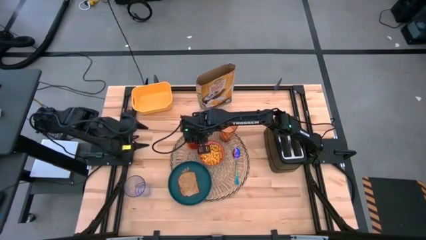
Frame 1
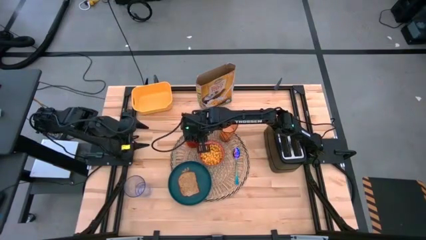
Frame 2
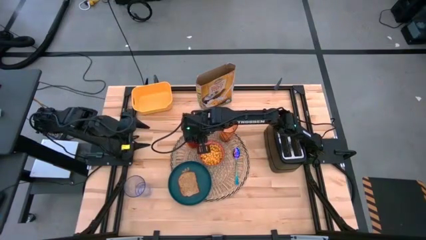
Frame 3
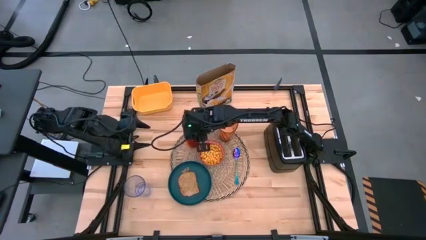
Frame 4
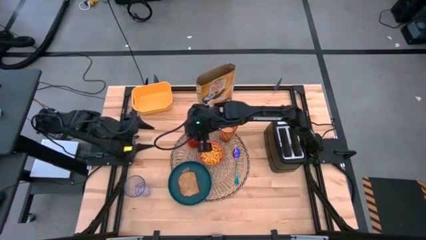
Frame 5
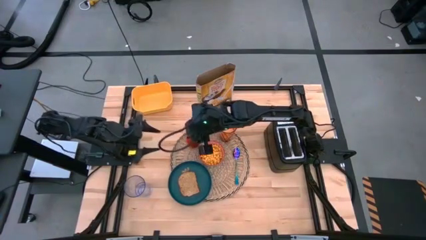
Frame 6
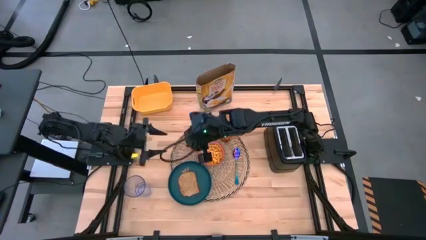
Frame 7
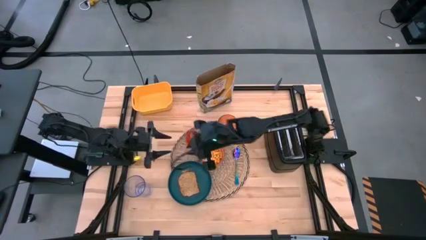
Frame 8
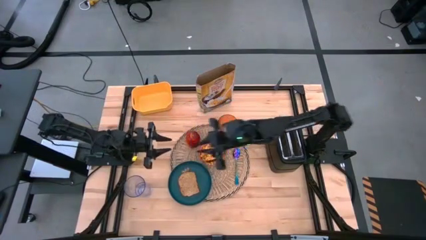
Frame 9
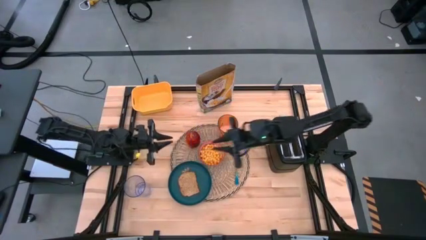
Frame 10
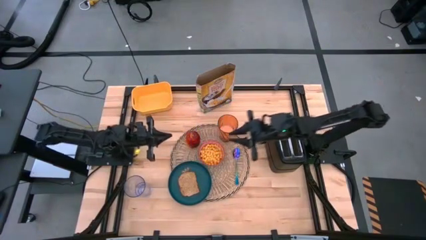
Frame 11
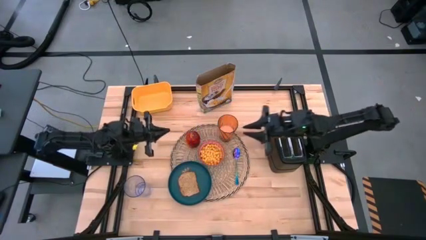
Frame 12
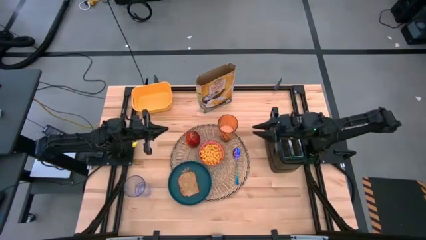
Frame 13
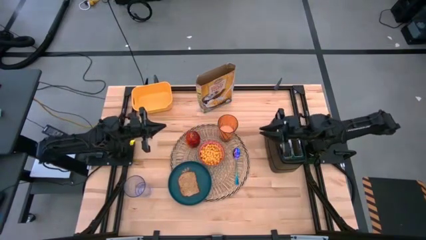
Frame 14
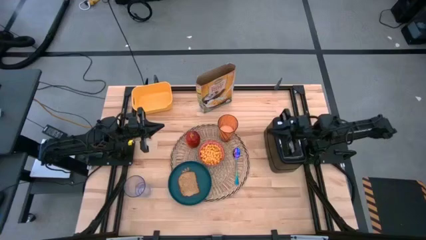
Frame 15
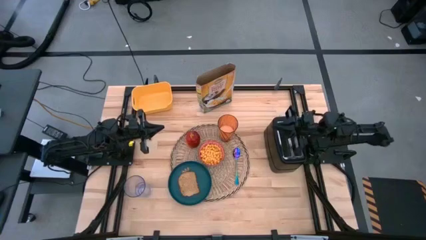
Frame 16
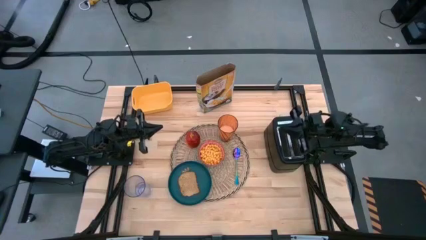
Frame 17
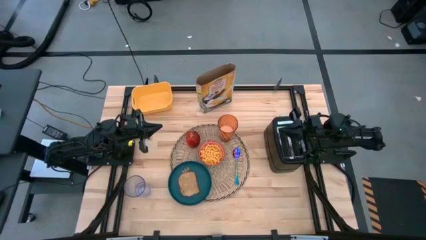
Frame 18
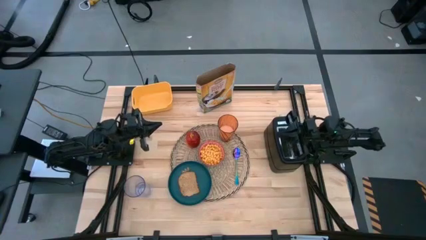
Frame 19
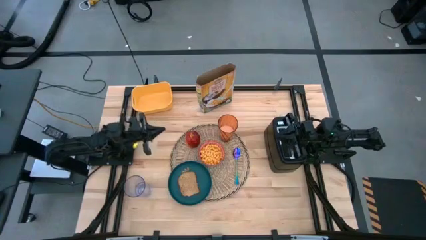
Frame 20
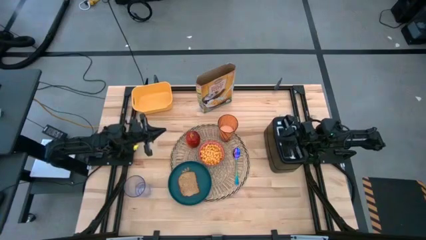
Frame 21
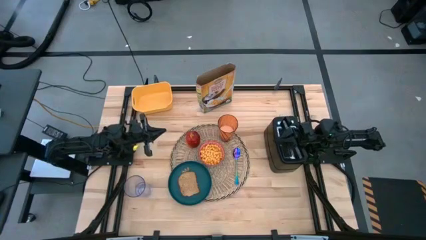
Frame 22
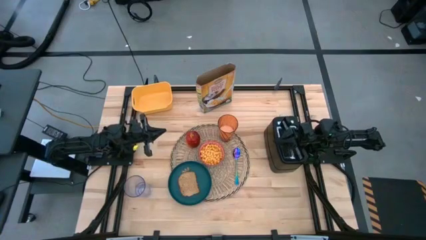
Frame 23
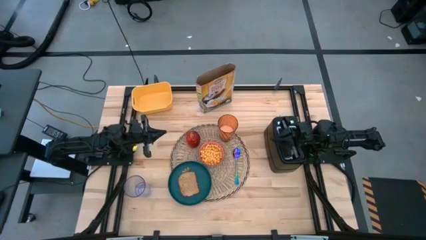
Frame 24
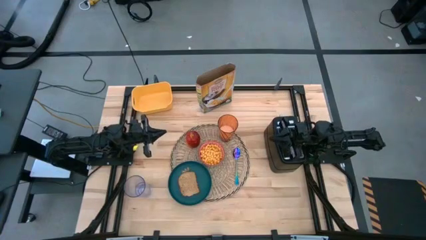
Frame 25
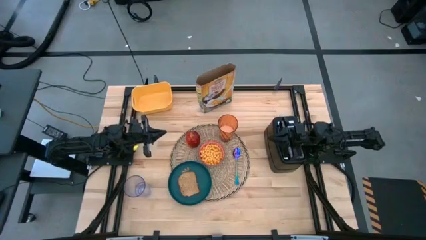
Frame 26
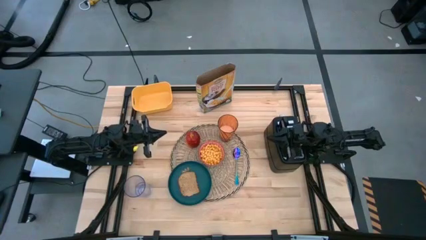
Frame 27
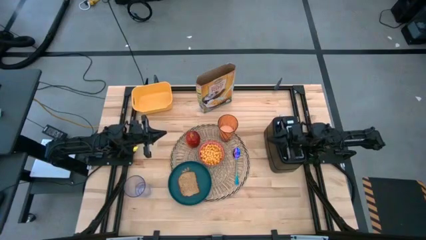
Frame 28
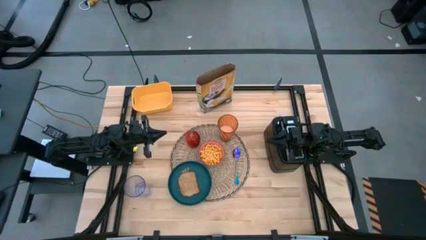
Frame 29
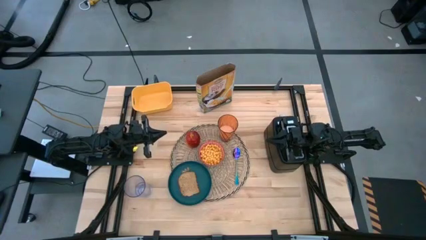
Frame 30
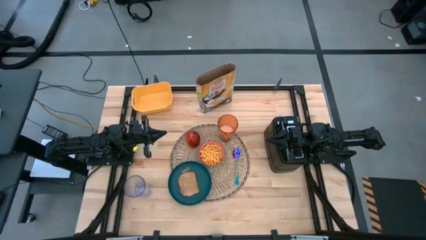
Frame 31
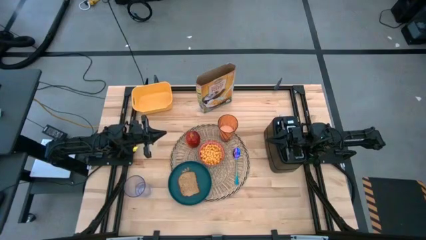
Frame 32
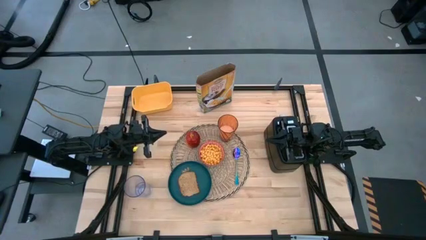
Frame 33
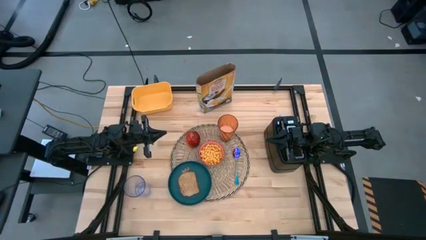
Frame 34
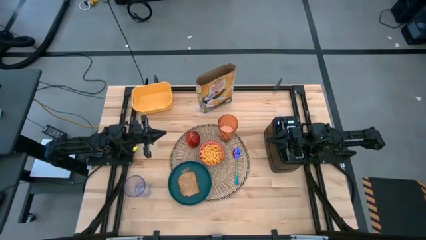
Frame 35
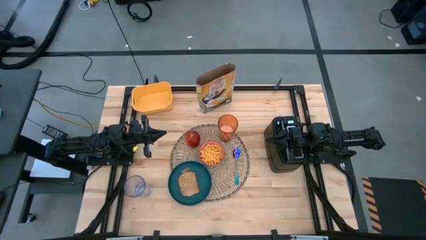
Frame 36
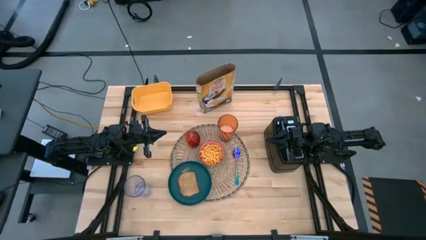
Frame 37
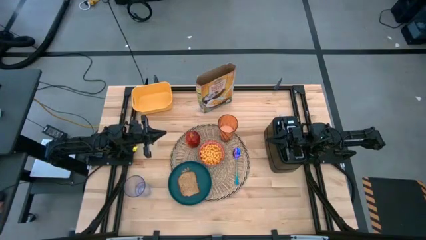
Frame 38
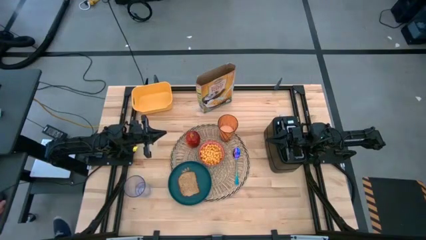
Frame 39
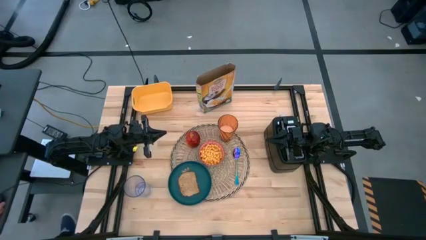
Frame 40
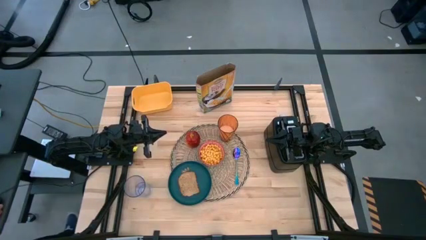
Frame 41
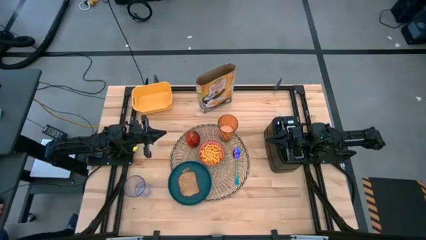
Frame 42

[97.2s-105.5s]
Task: Arrange a breakfast setting
Return to Home Position

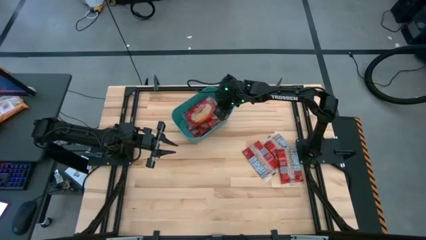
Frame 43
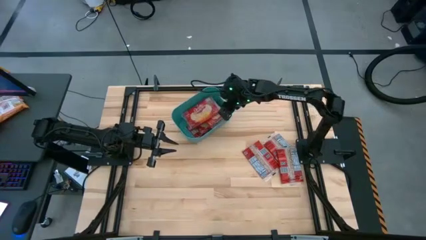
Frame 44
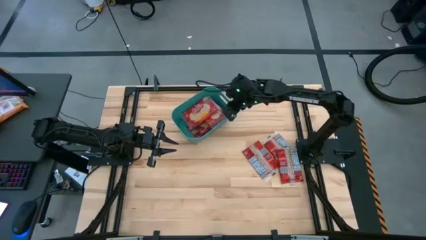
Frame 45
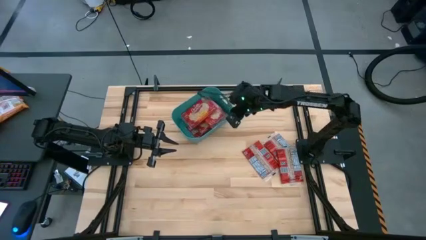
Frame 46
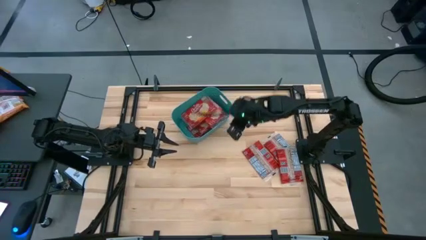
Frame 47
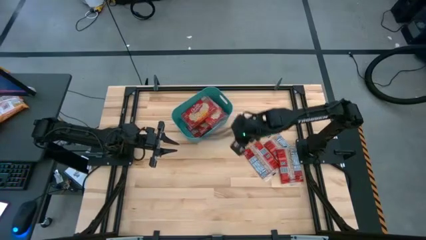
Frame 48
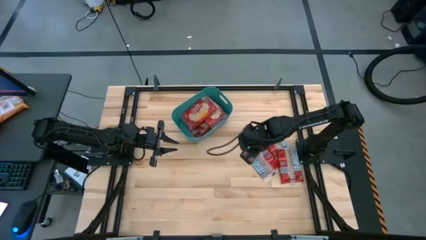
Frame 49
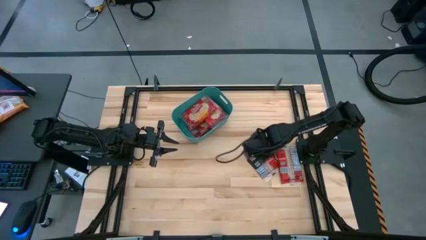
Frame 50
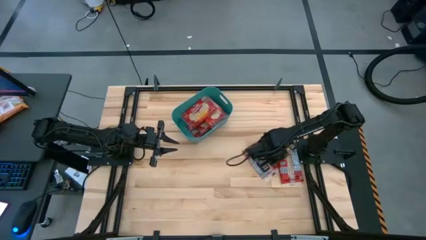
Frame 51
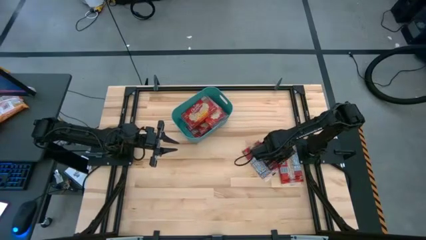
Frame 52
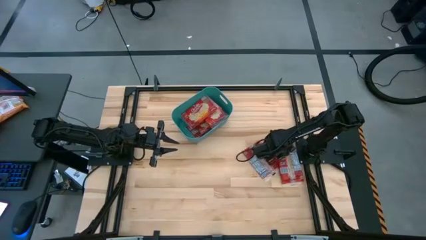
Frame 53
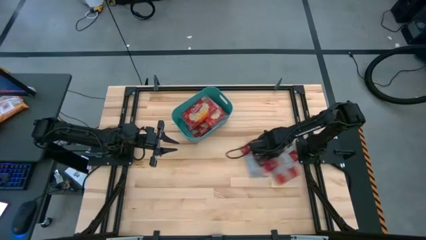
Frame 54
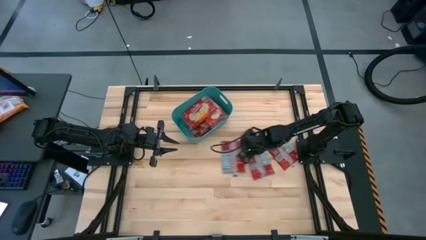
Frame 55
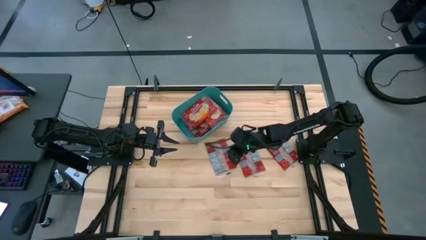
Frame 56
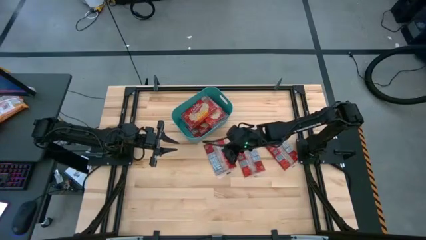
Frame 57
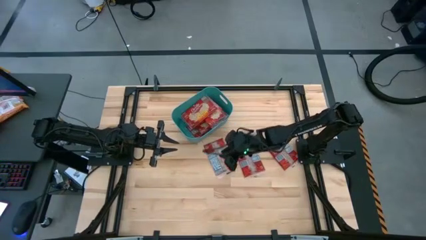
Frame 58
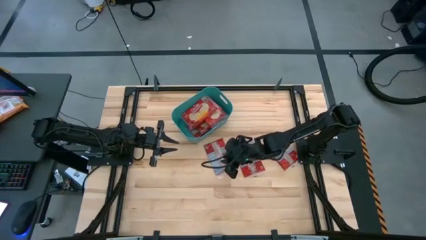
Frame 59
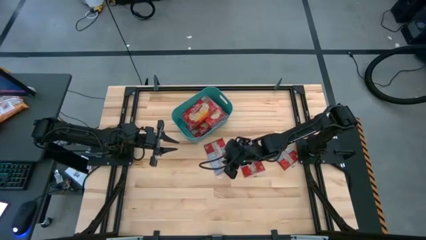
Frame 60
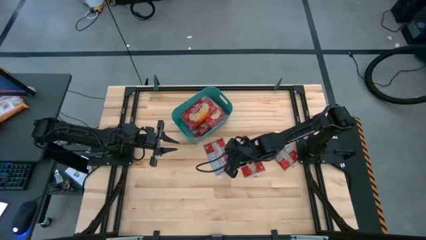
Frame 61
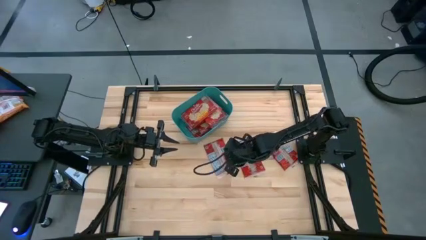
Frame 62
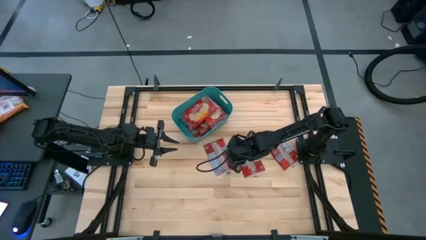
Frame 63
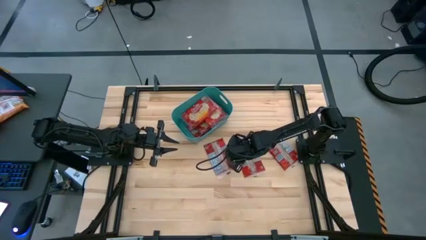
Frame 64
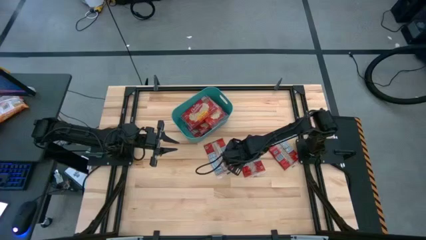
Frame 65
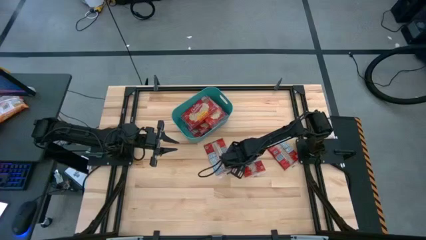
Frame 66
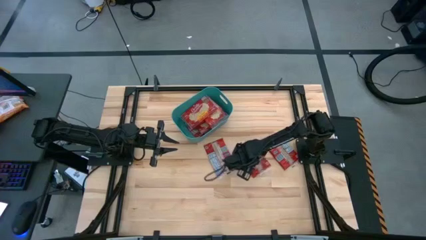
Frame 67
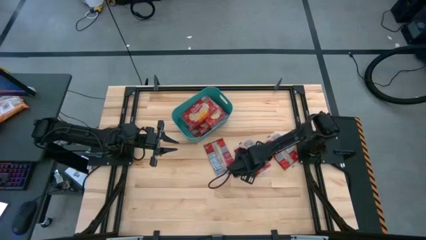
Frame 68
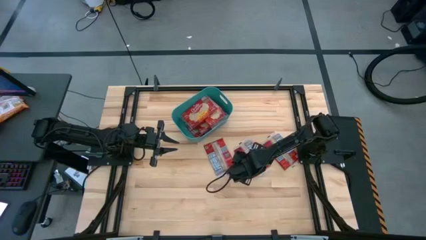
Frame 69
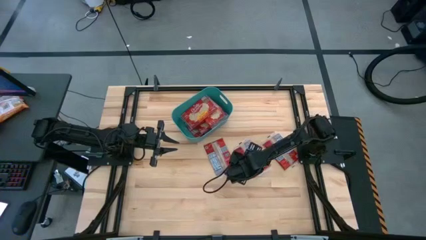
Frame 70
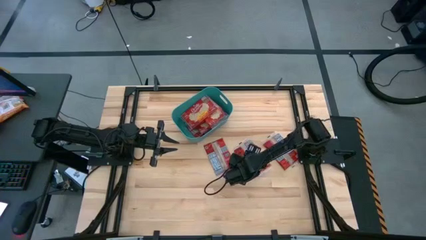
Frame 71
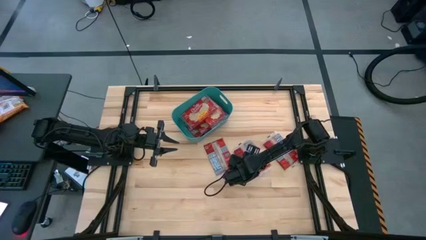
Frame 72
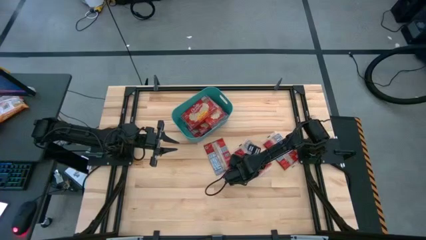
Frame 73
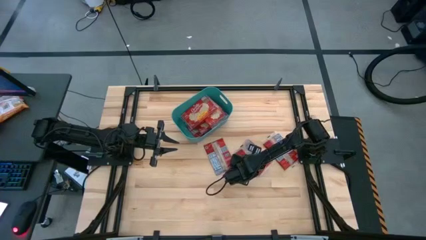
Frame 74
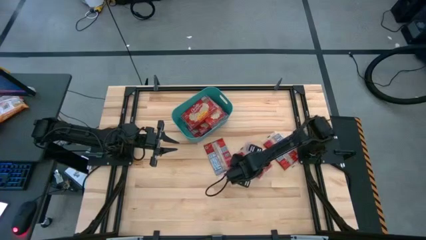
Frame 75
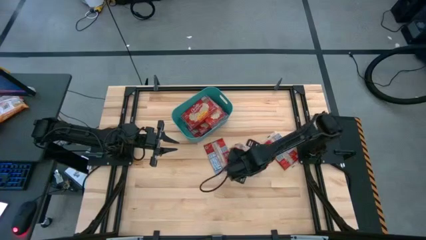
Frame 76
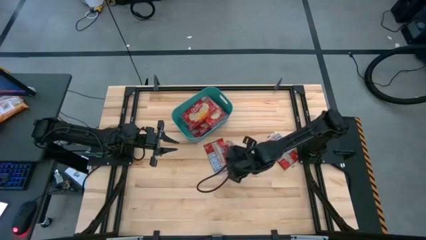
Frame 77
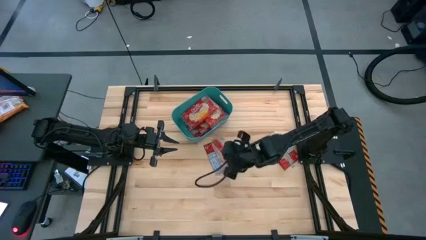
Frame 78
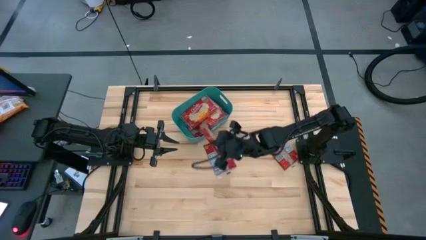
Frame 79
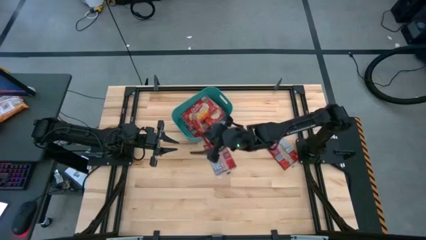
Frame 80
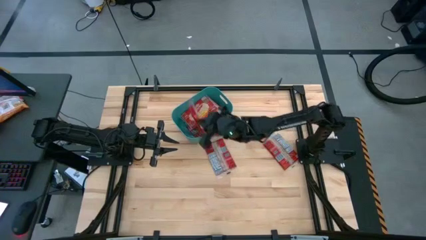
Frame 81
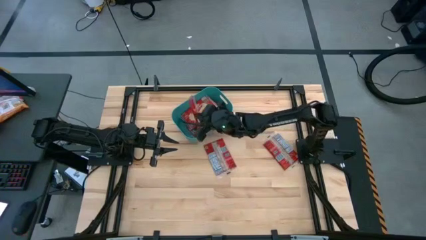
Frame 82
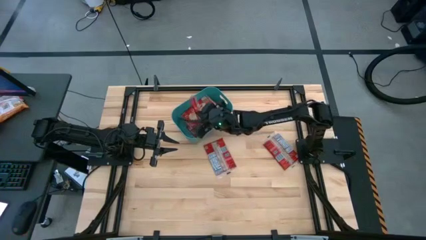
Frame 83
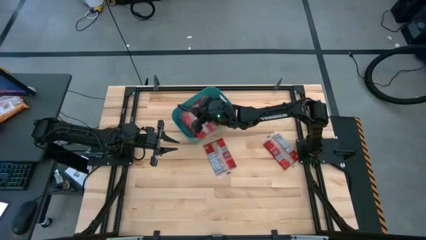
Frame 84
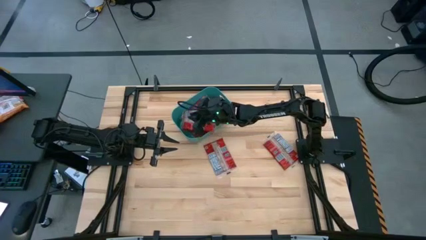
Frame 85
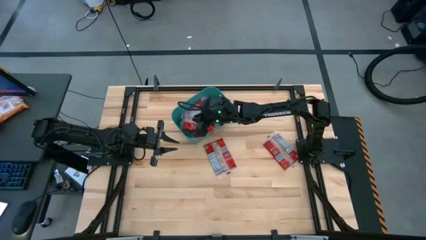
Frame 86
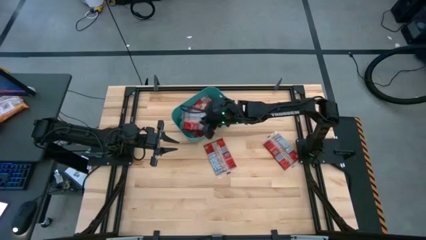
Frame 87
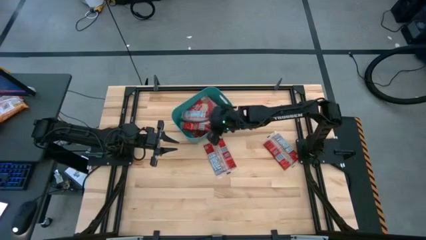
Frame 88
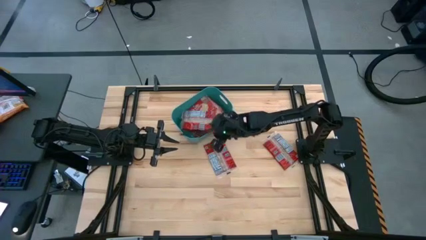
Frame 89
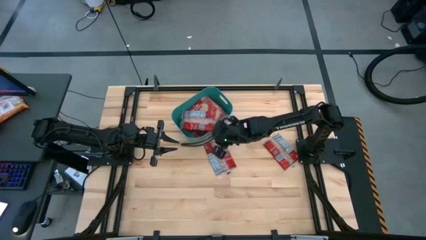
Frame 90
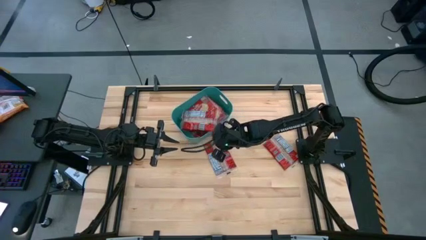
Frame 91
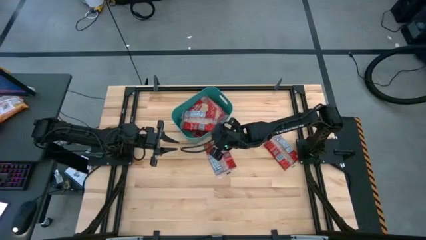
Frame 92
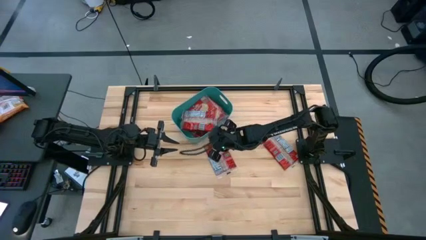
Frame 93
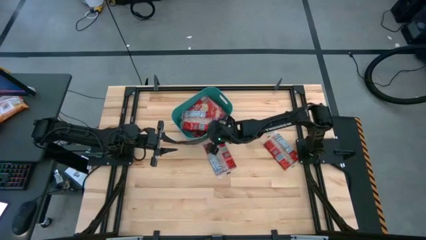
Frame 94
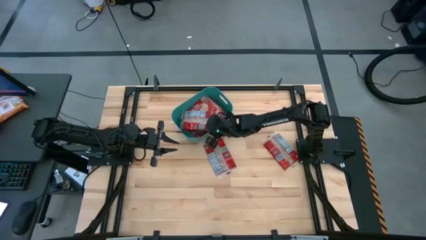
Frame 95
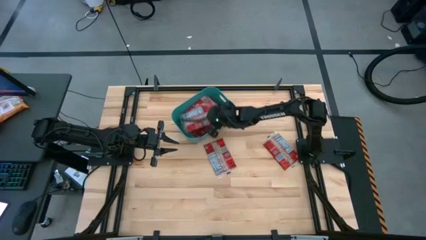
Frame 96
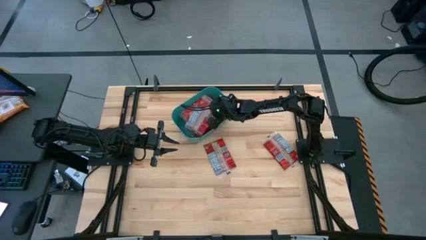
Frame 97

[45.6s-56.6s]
Task: Sort popcorn bags into baskets
Put the red popcorn bag into the green container
